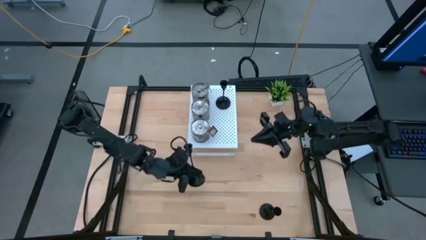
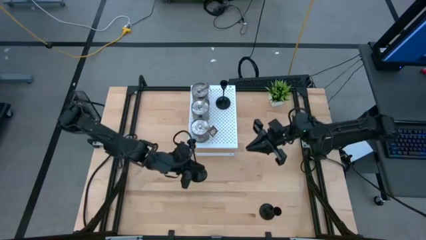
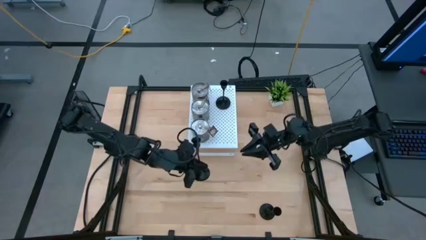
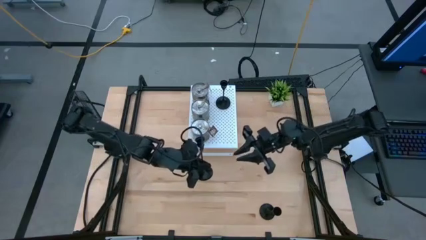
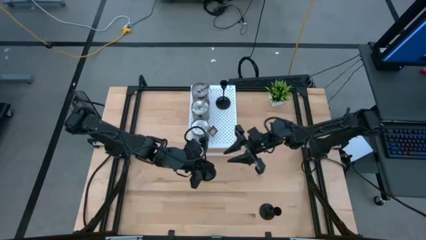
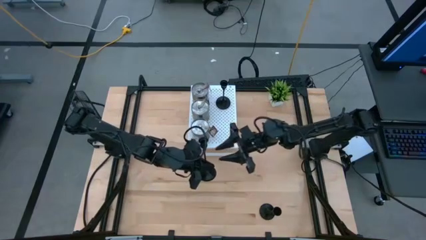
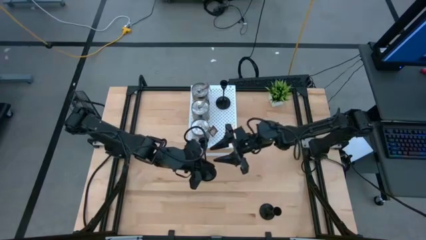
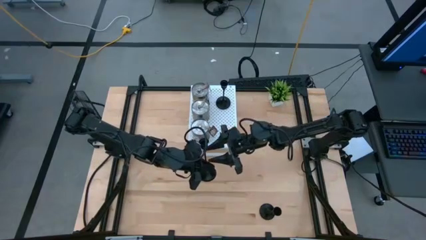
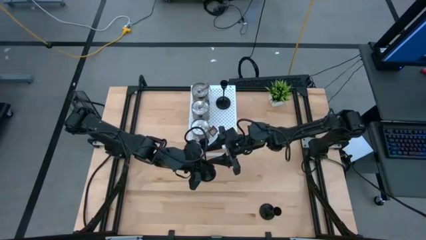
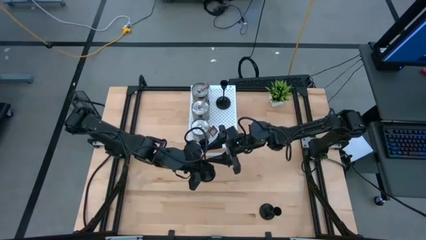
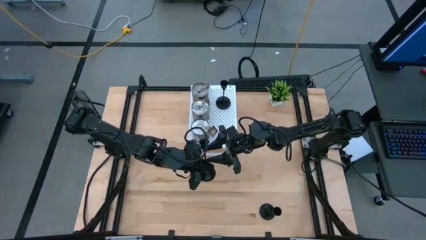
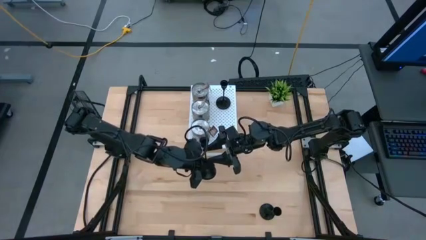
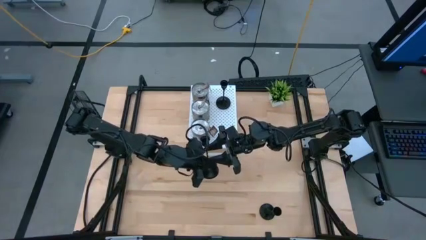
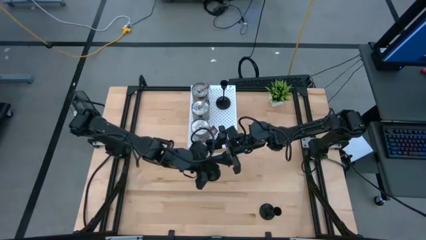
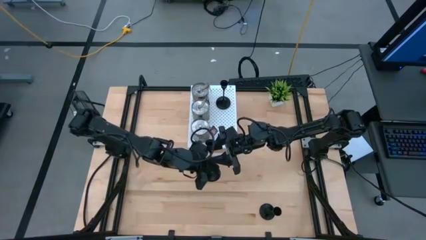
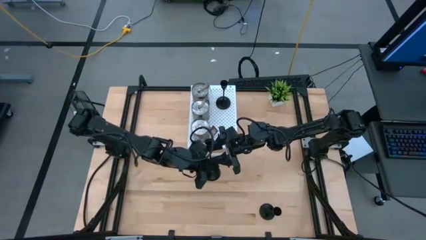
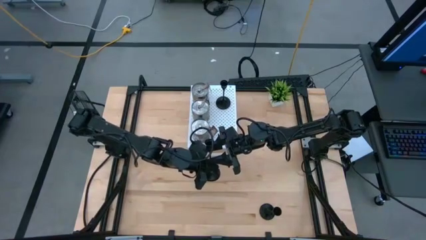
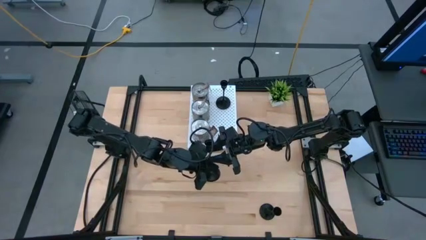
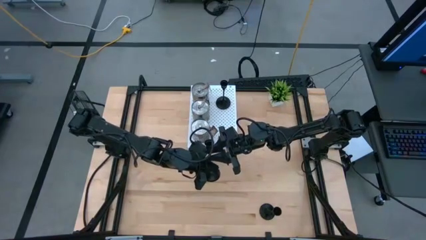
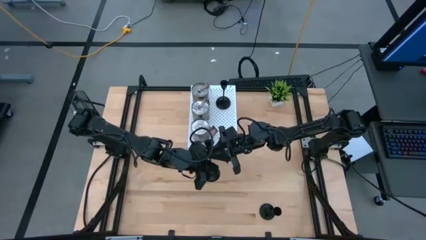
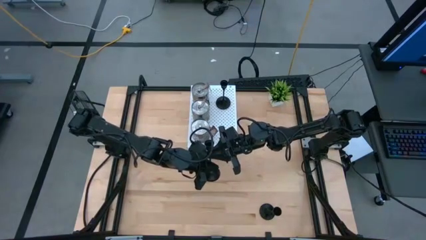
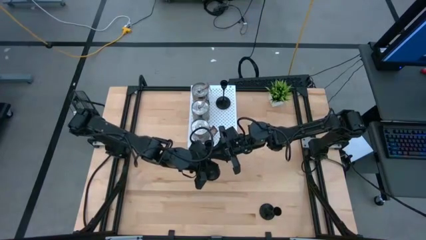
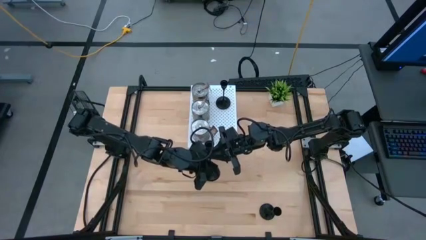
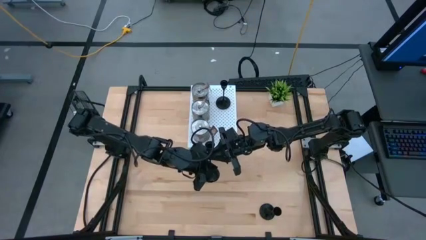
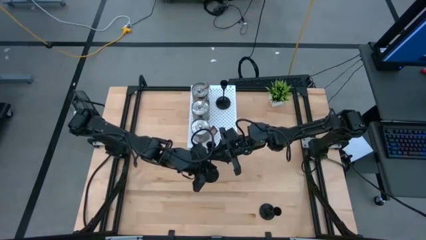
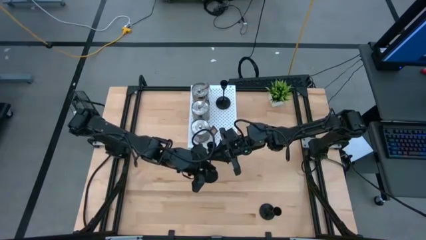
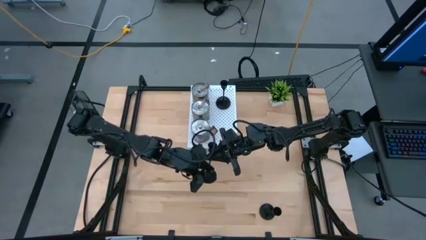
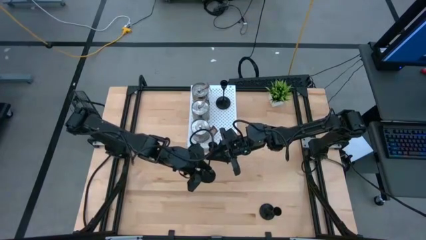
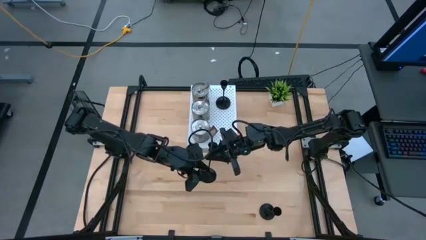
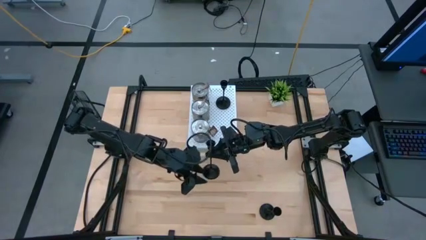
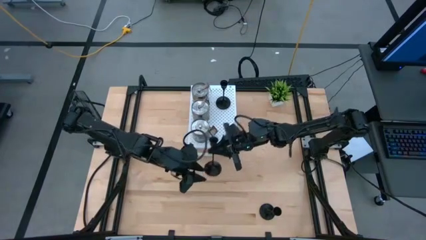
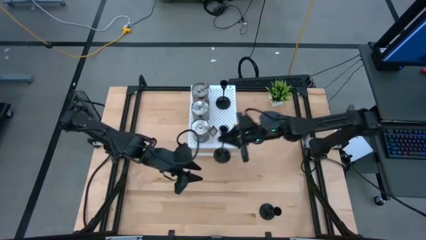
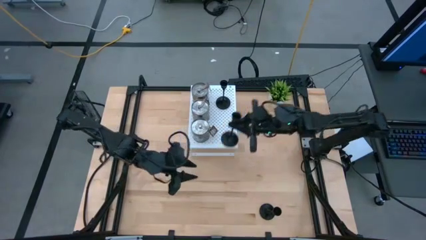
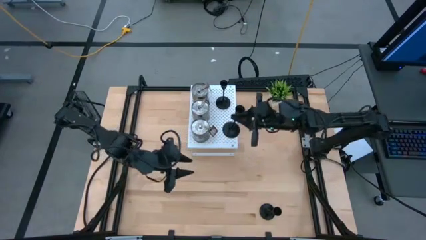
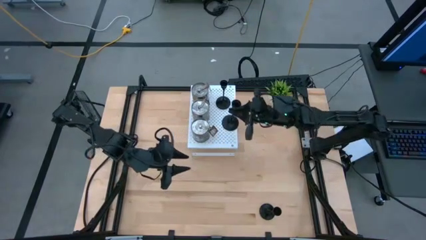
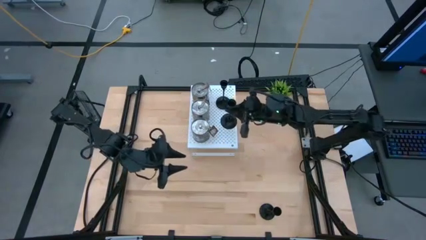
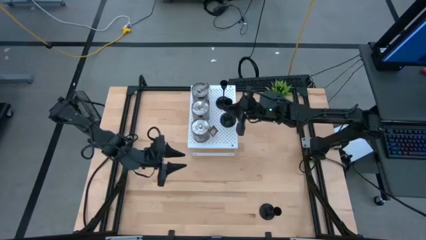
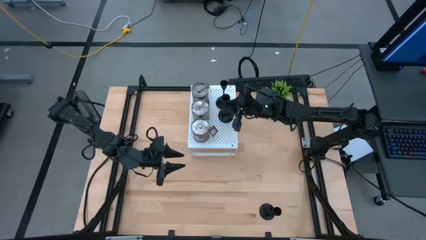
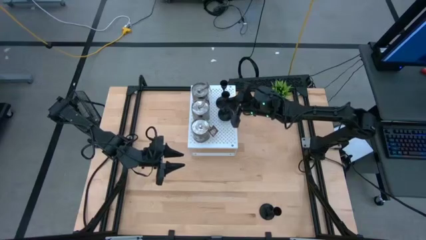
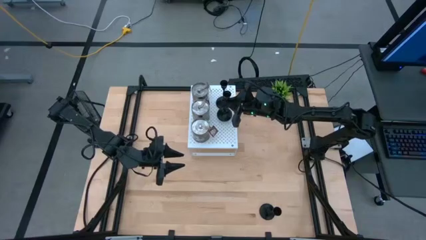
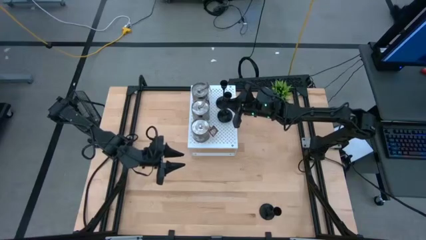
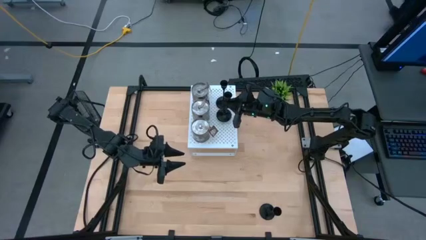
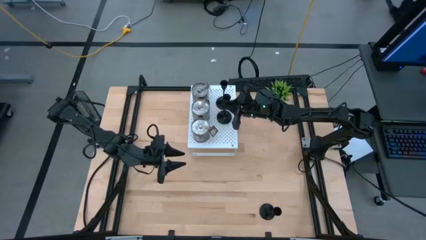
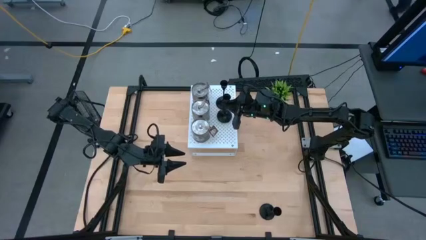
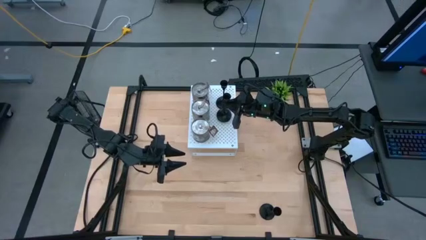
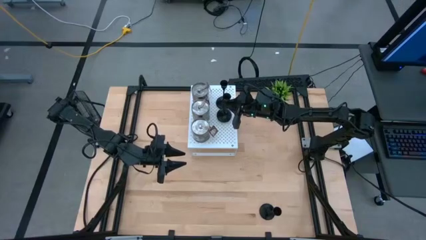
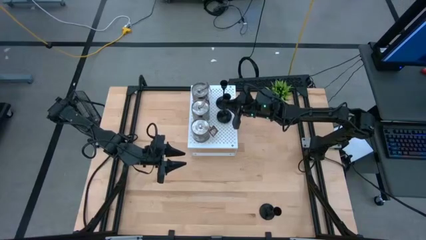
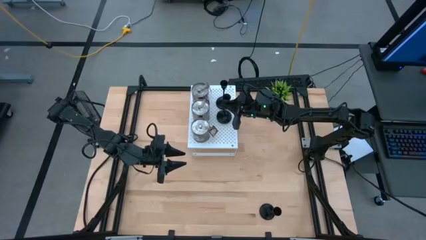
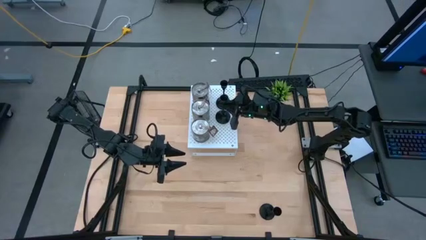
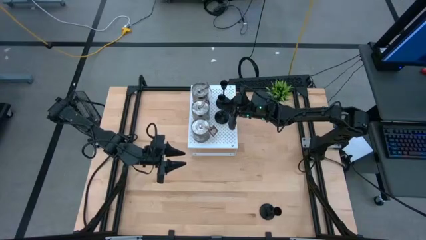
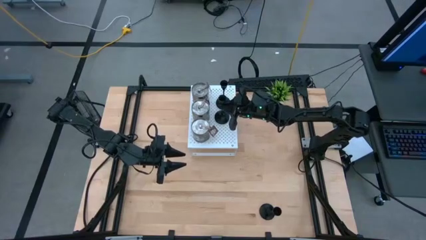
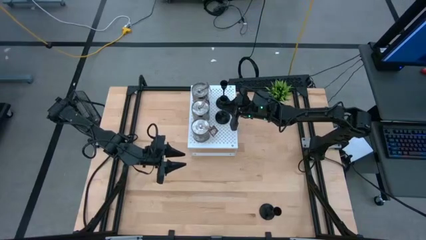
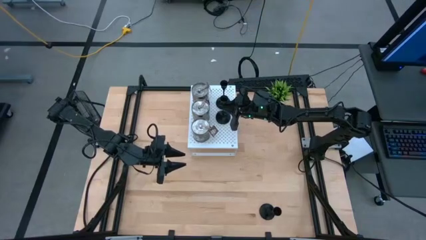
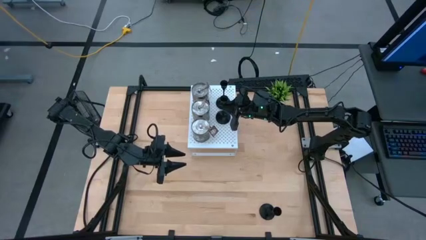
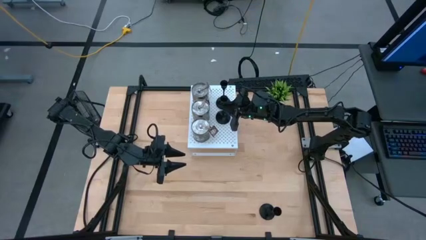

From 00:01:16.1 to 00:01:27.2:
Task: Pick & Place candle stick holders
Put the left black candle holder on the shelf aligned with the other black candle holder

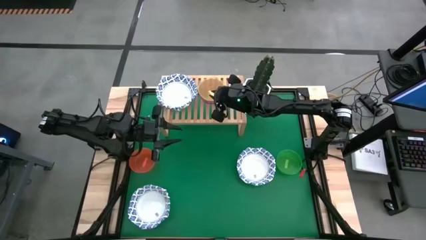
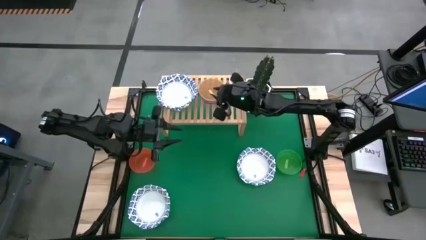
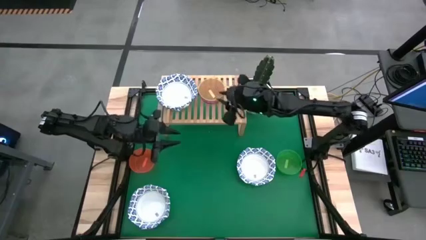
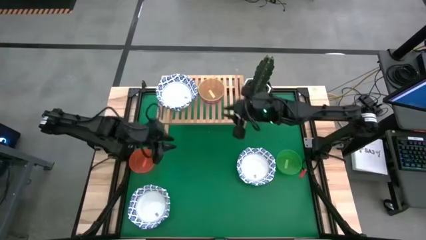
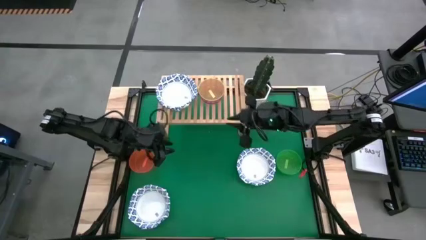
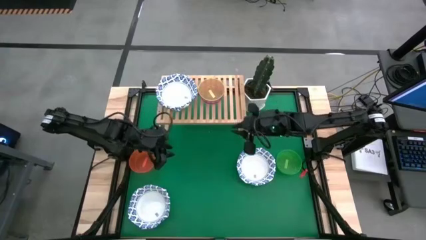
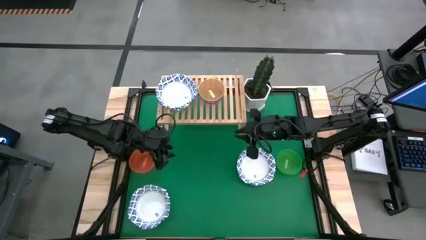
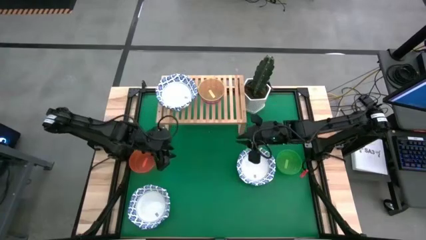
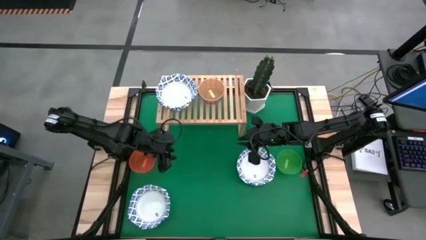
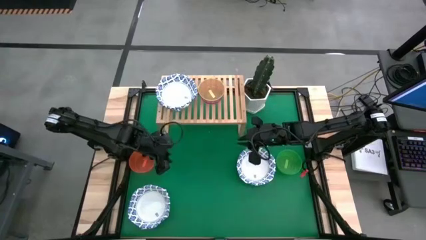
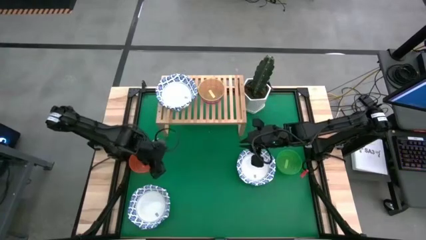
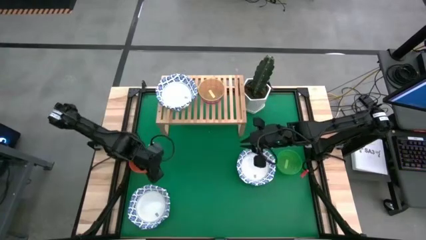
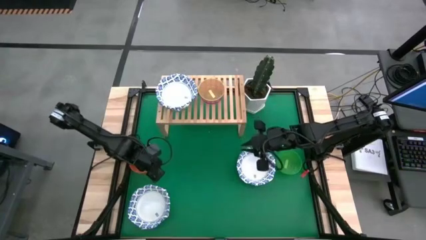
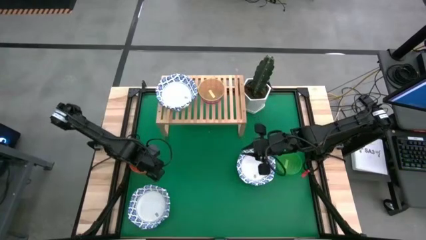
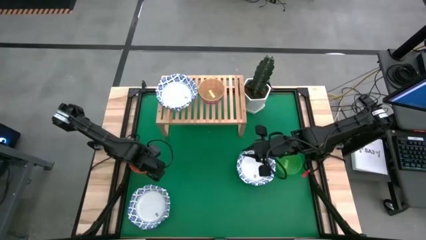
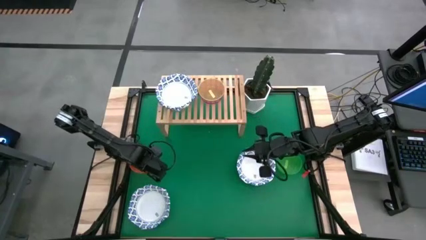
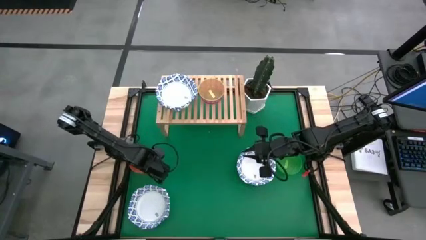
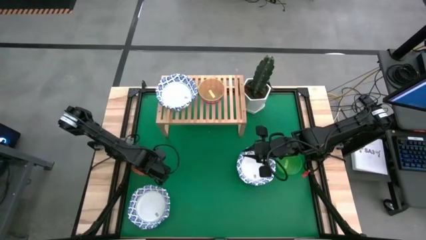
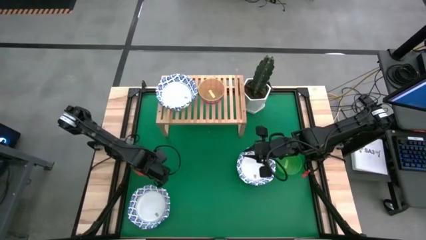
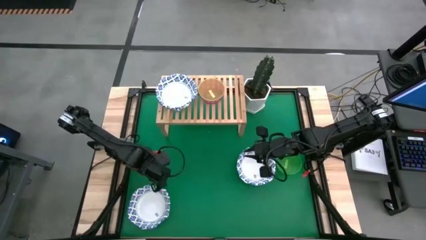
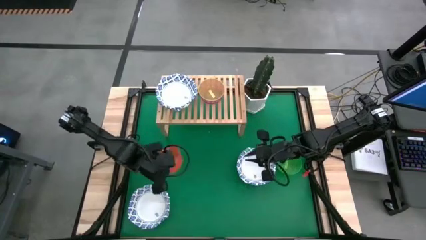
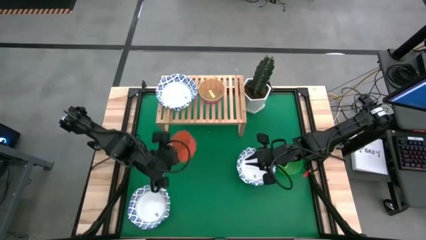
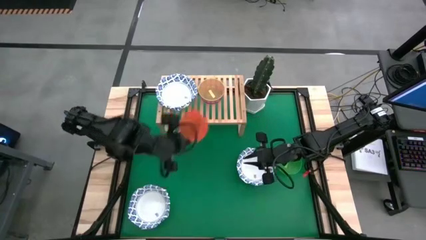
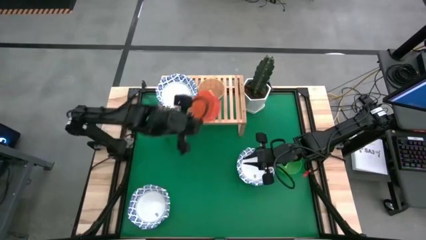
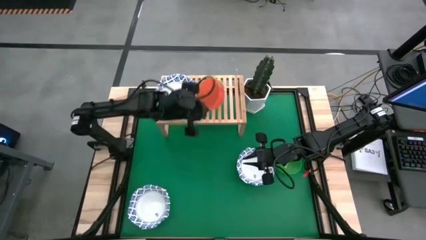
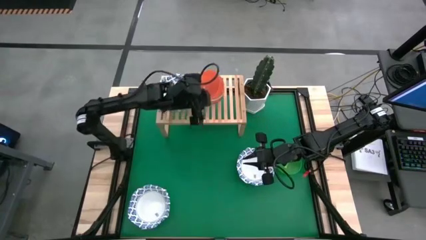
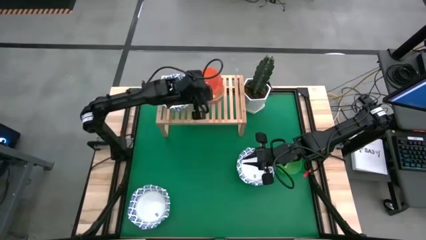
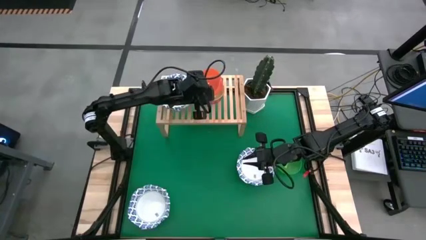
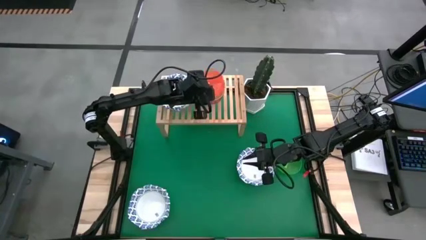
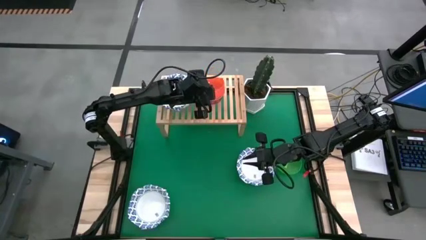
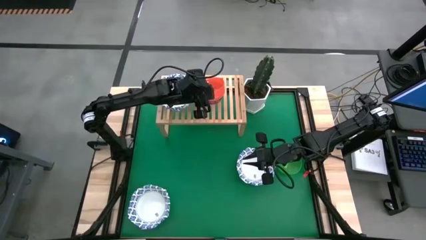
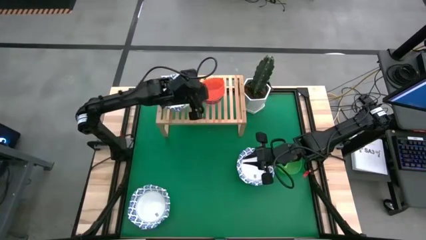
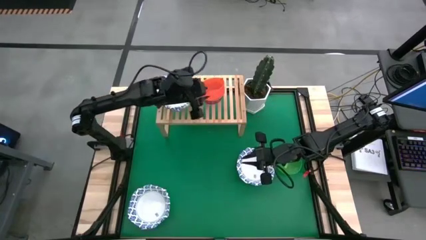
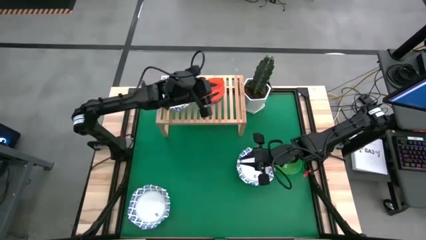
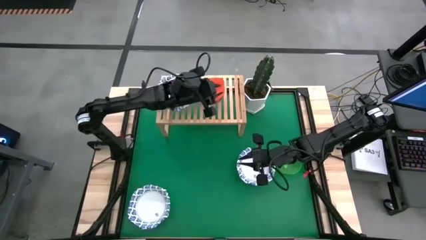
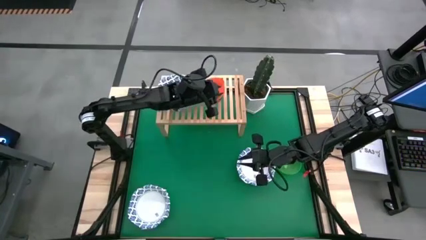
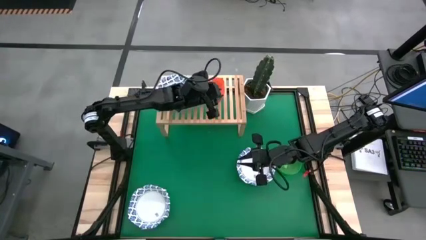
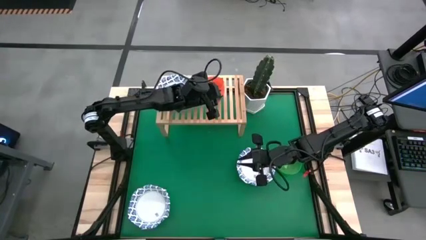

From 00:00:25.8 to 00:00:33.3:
Task: Place and stack bowls onto a shelf
Stack the orange bowl on top of the yellow bowl on the shelf
